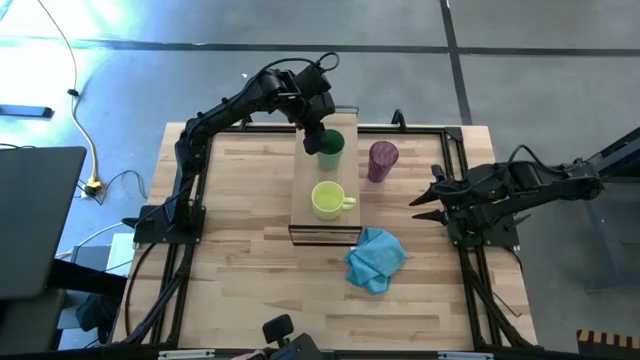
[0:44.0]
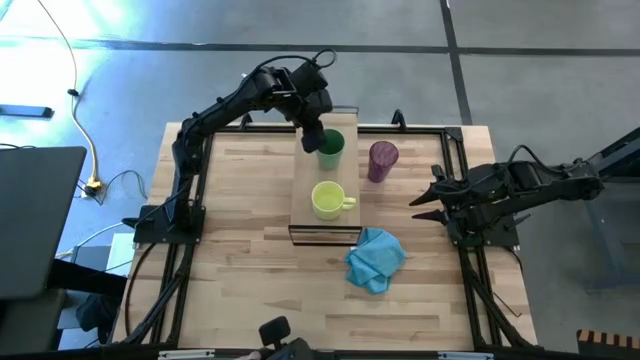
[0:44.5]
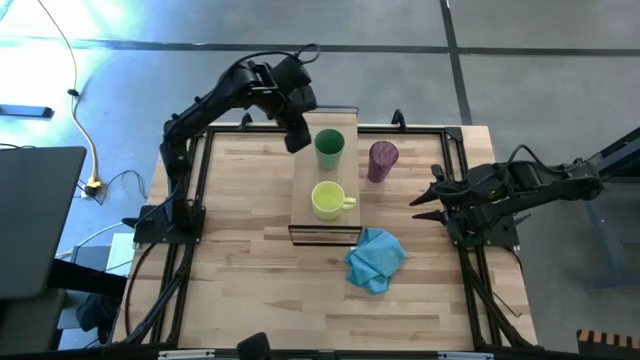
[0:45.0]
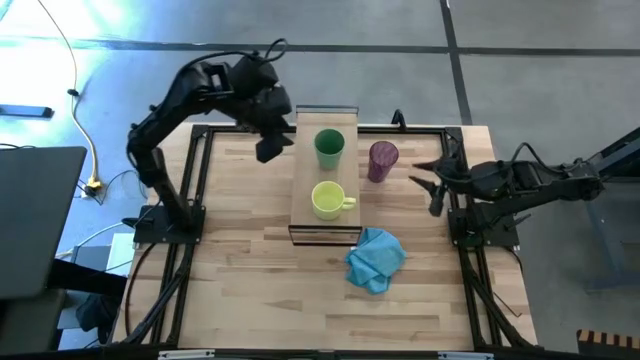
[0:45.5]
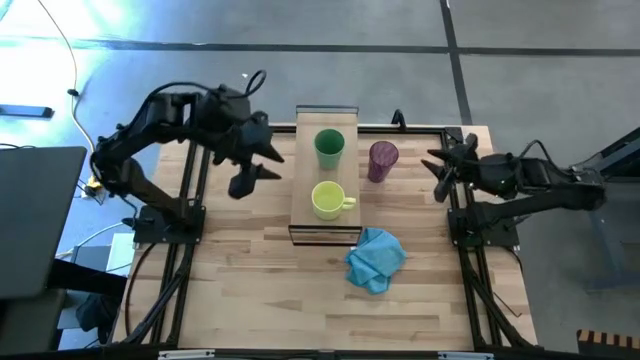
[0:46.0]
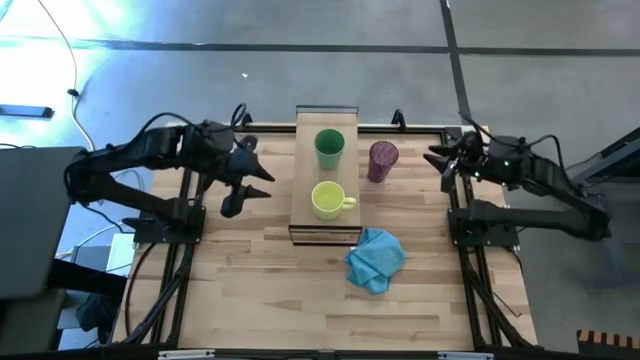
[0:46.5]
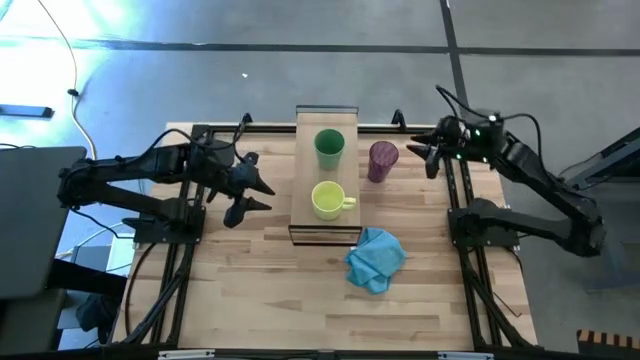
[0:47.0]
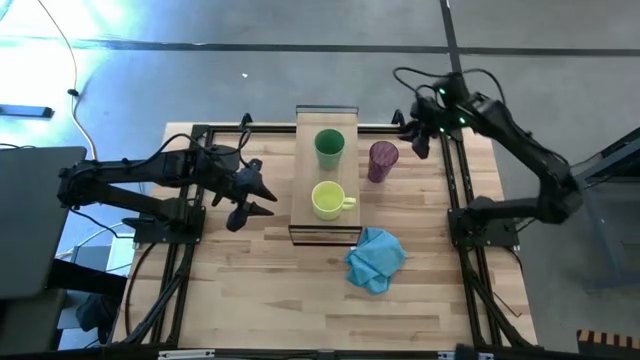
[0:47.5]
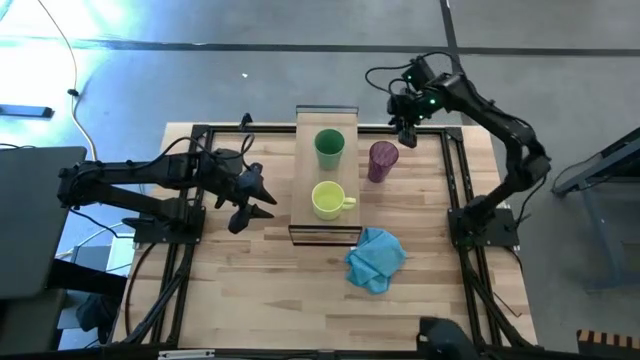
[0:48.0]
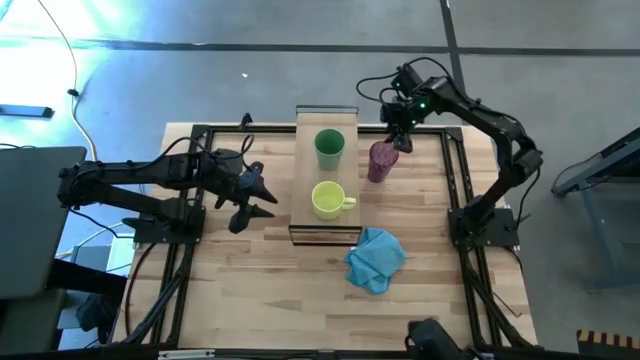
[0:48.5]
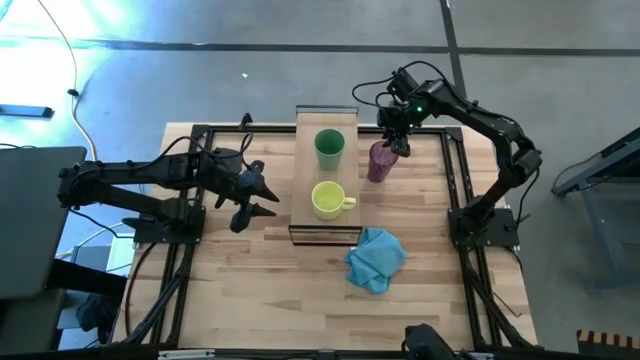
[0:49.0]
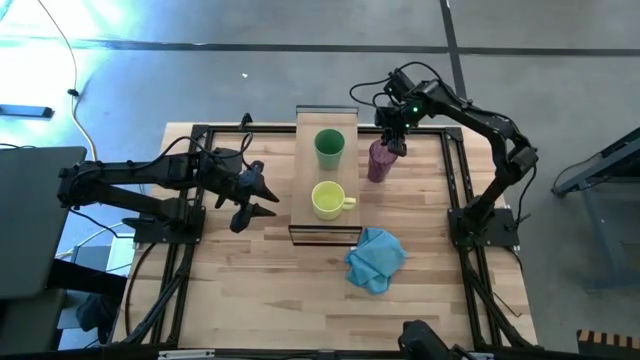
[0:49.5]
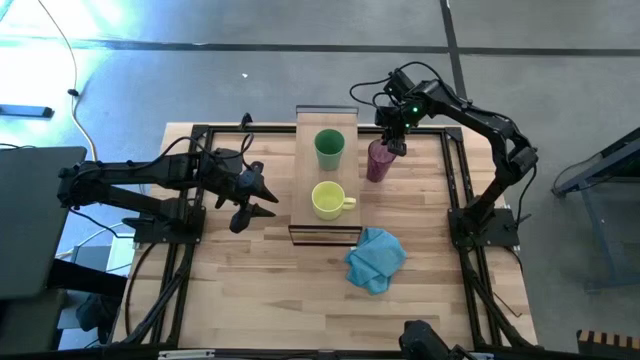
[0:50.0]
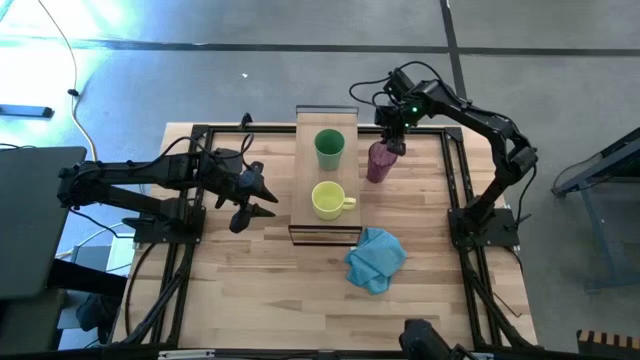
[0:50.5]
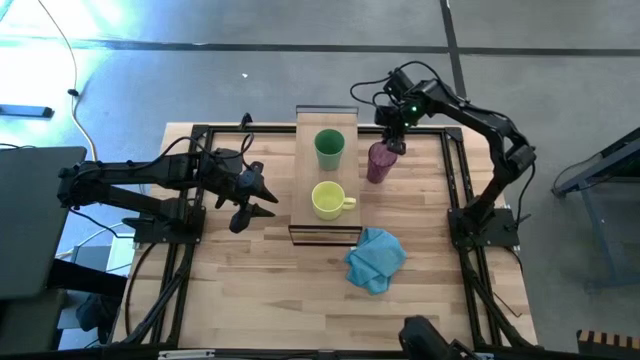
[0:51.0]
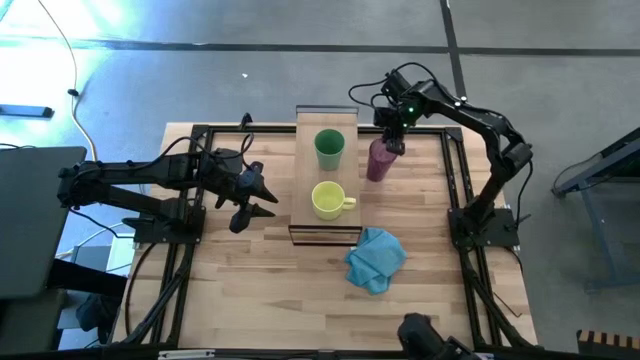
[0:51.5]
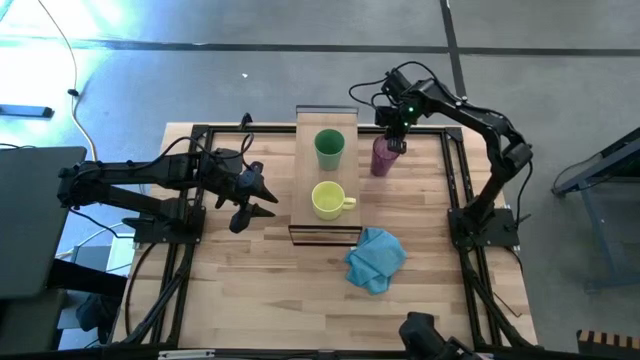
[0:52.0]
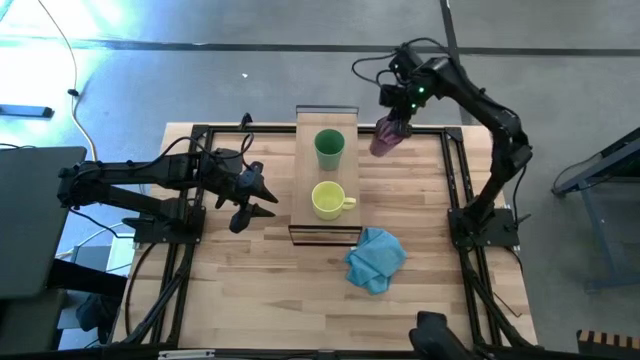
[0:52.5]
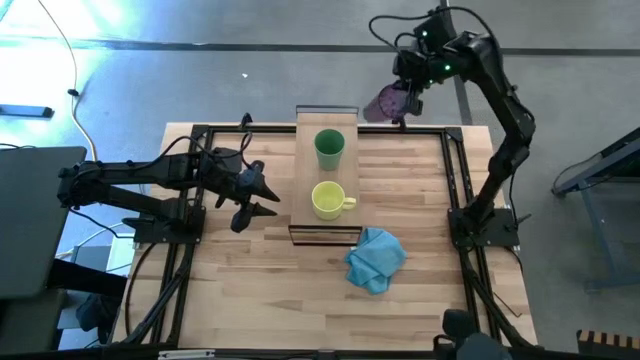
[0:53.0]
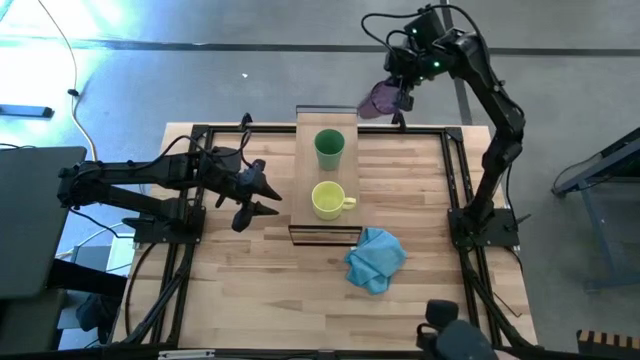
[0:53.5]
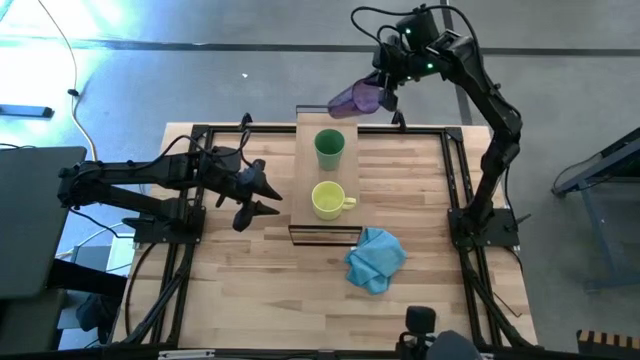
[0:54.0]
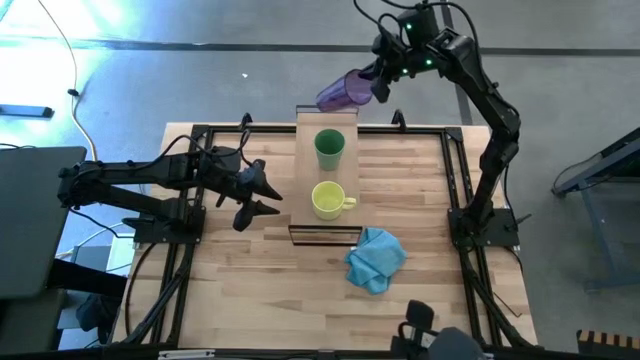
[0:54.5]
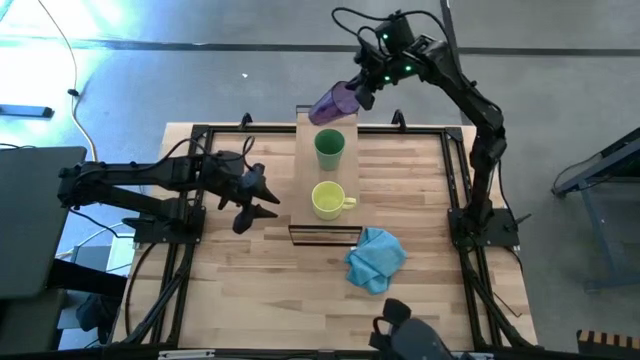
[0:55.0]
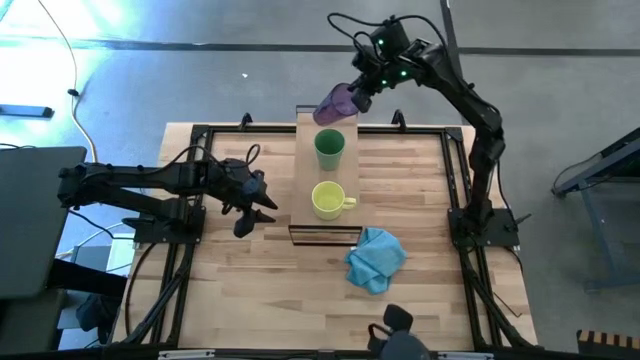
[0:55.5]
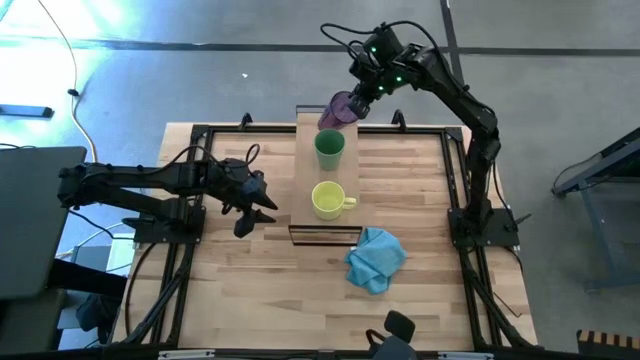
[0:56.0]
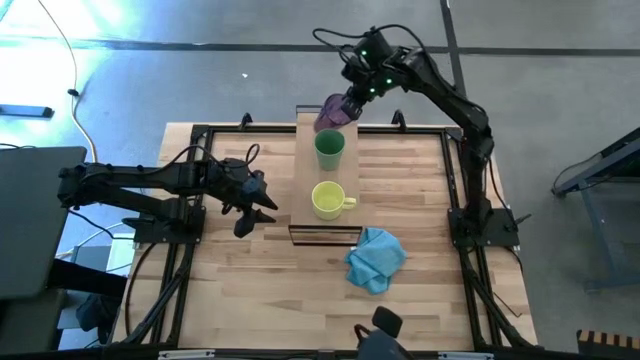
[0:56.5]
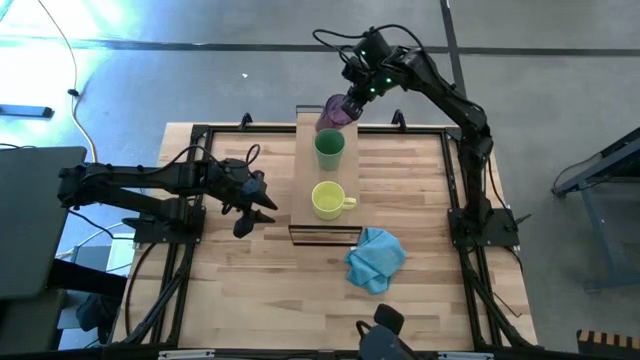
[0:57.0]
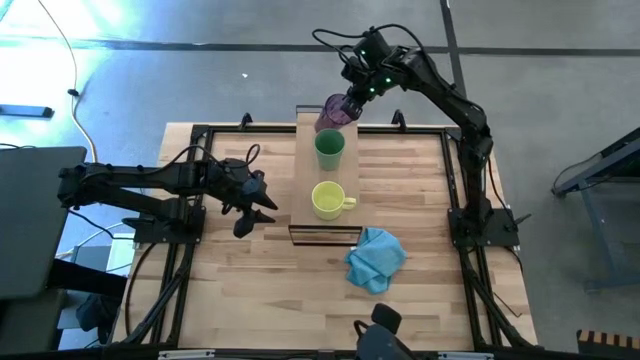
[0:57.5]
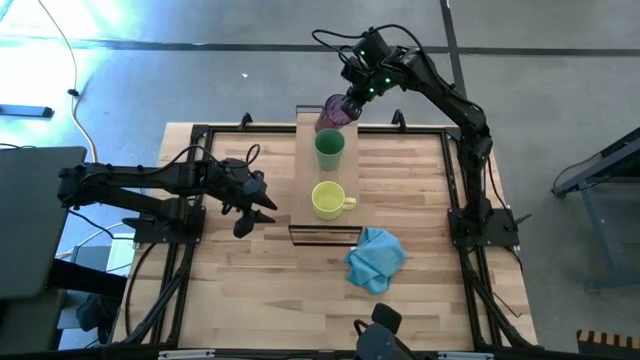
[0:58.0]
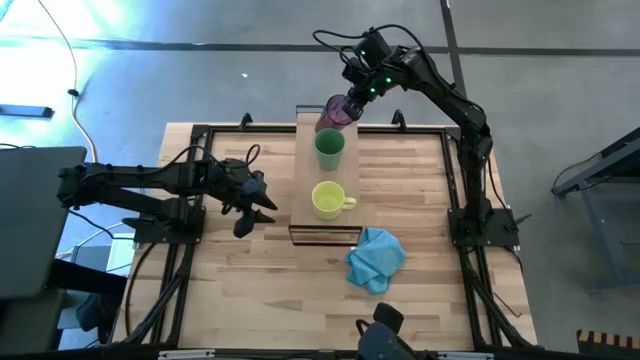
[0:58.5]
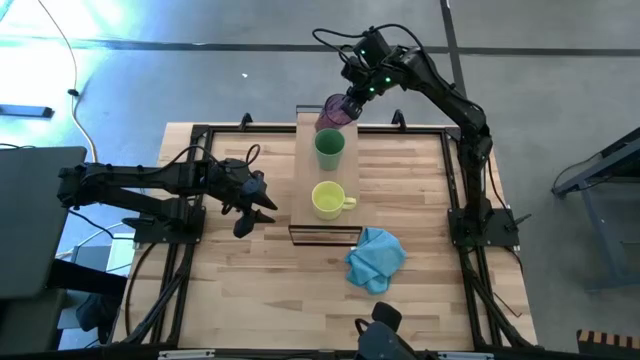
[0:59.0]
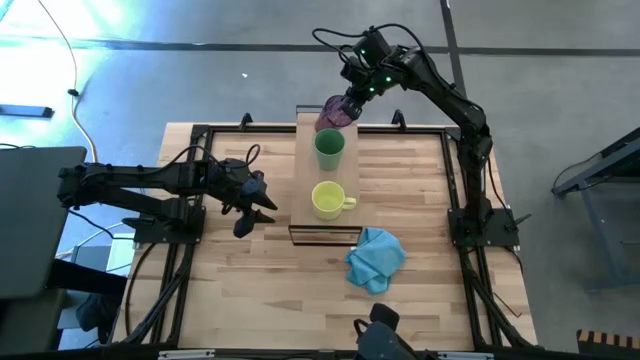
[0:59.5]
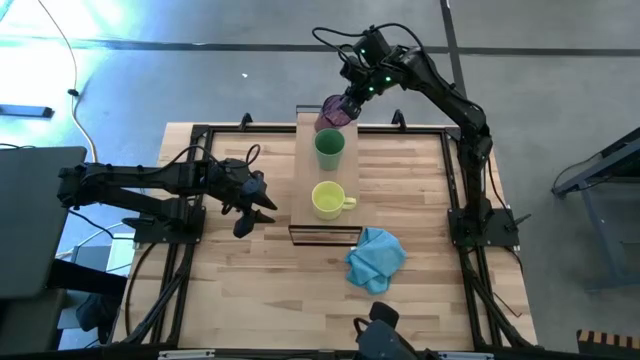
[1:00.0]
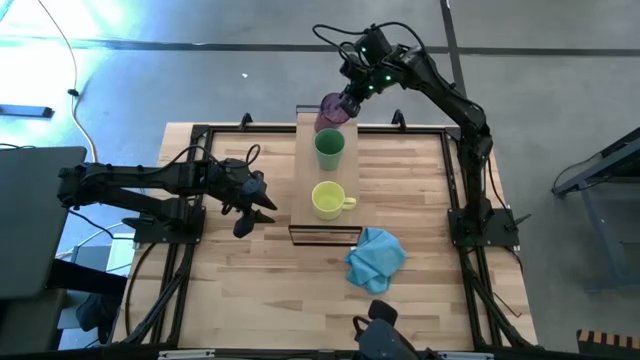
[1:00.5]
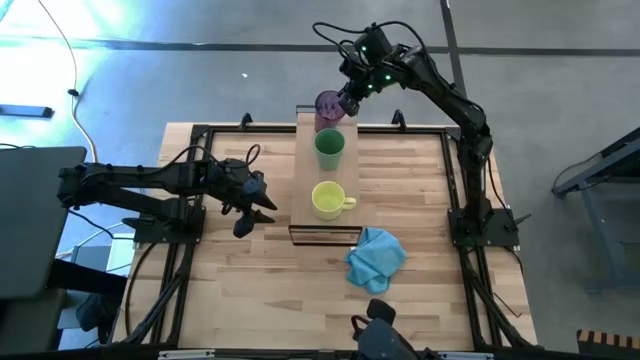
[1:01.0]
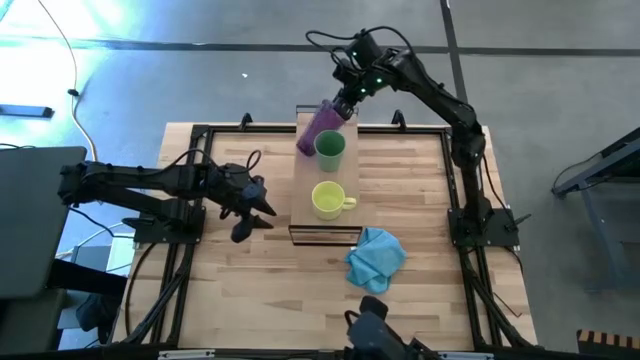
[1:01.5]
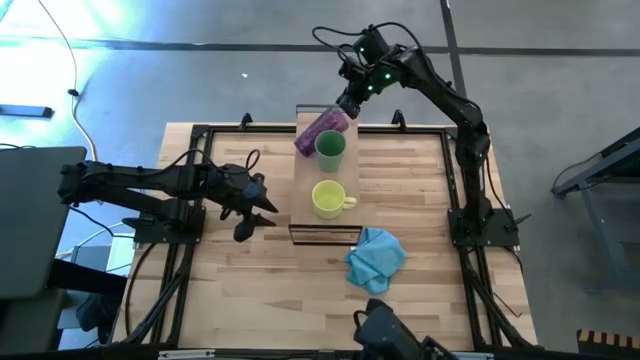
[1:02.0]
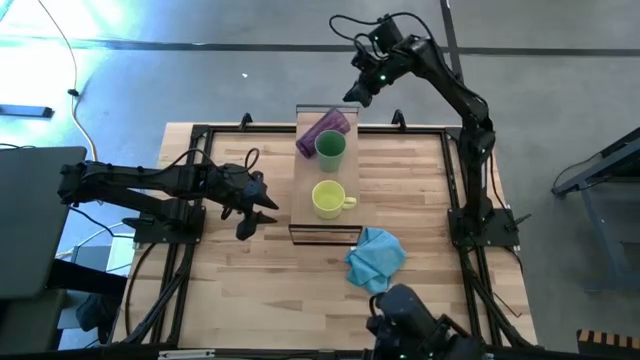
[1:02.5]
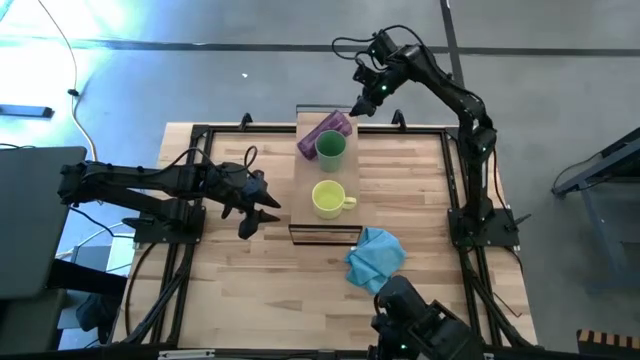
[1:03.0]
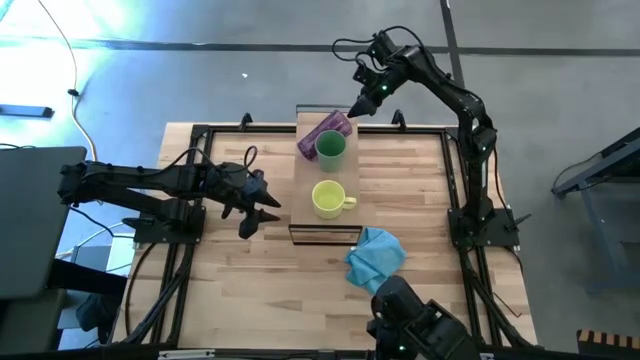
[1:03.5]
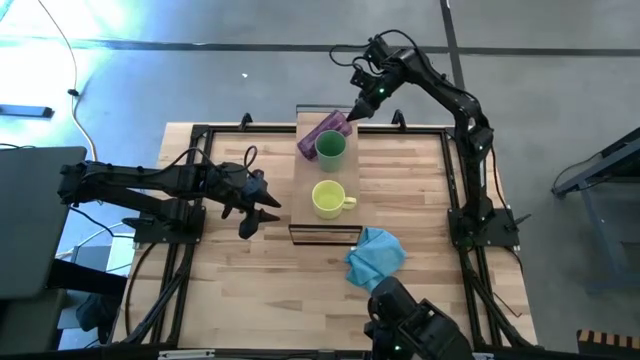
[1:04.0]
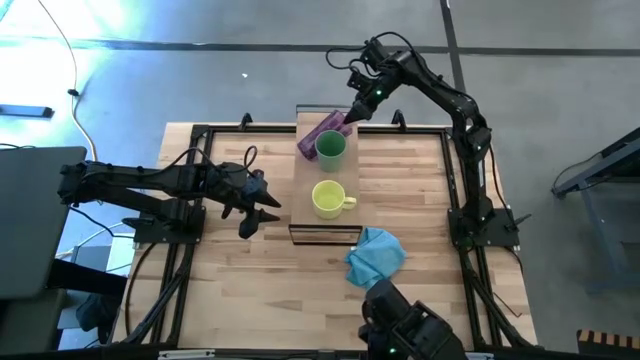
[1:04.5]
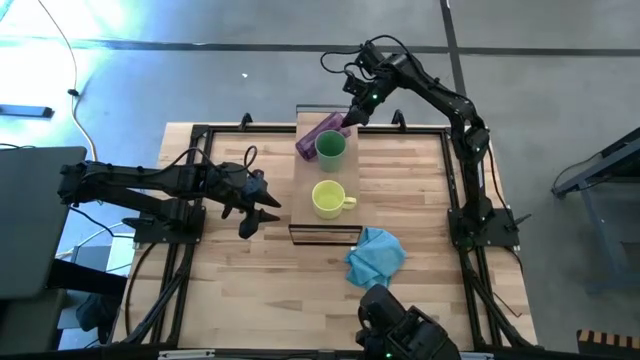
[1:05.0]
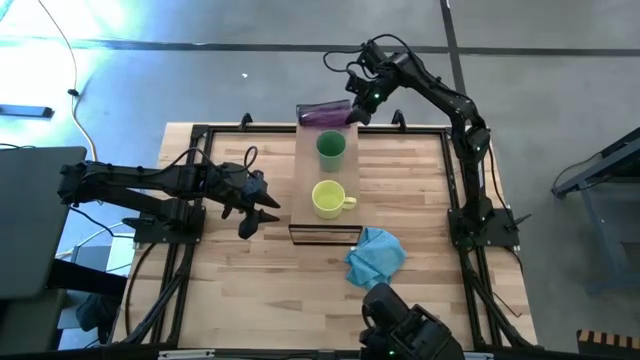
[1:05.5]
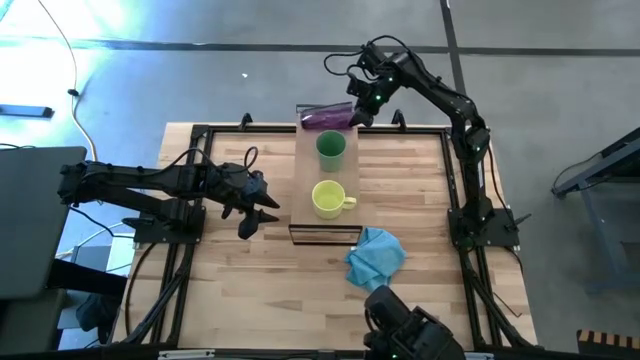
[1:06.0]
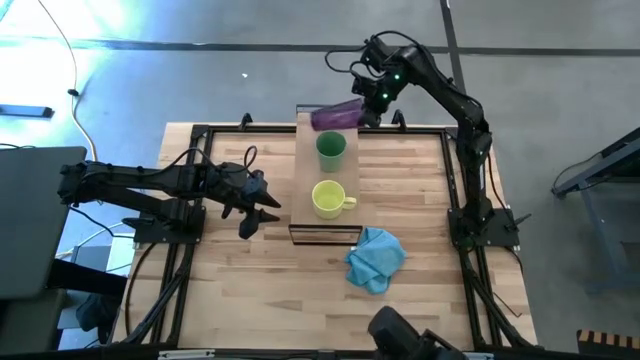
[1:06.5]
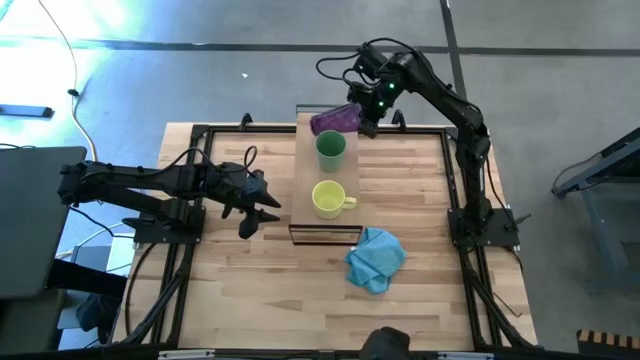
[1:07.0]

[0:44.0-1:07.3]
Task: Stack small to large cups/mugs on shelf
Put the violet cup on the shelf
